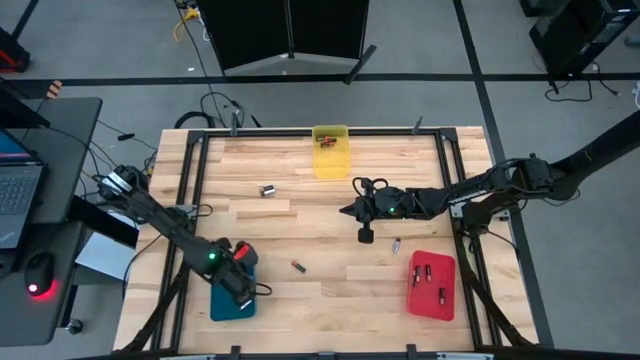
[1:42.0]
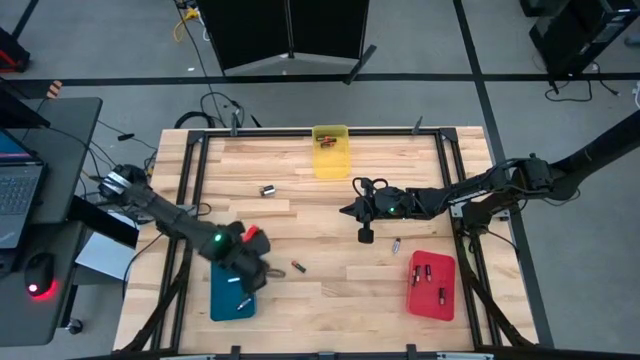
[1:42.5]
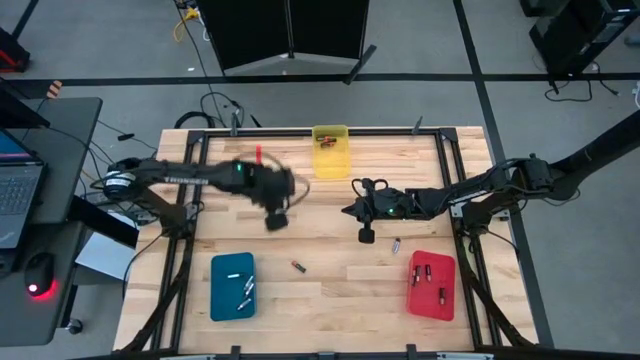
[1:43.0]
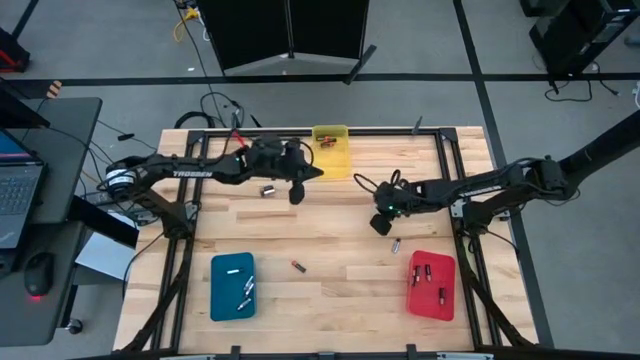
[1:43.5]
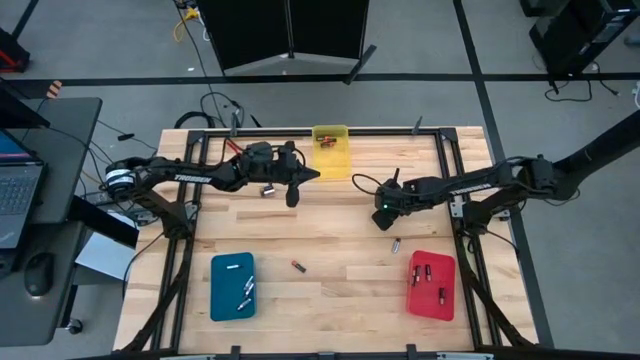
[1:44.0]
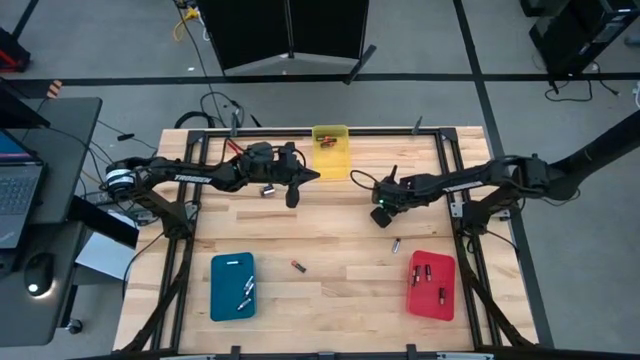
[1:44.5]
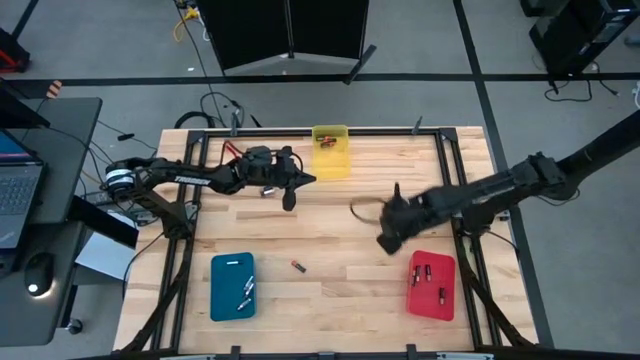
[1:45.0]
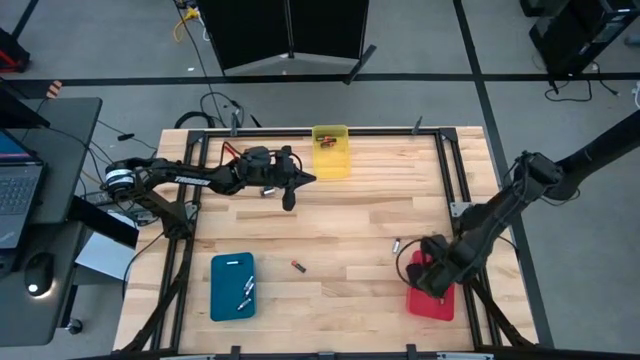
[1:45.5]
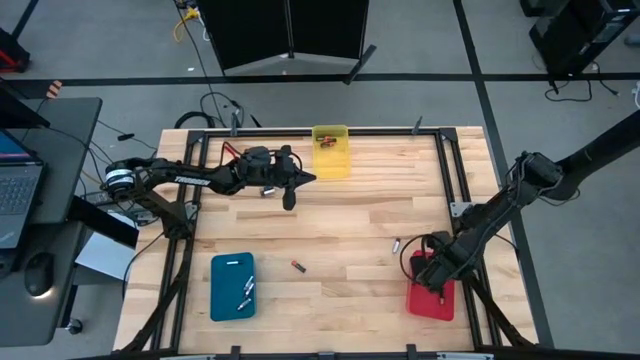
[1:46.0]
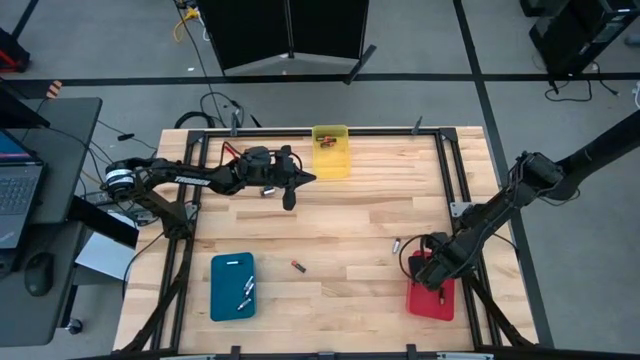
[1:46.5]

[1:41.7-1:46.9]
Task: Sort batteries
Put the right golden battery into the red bin

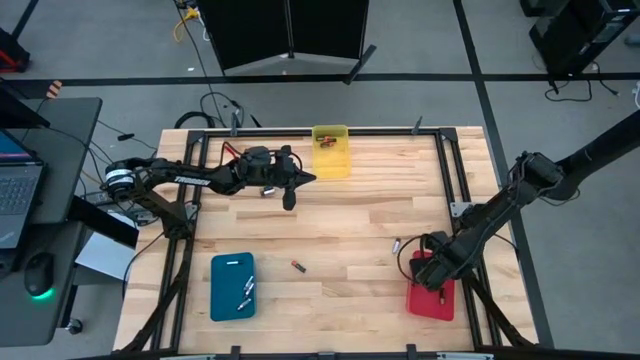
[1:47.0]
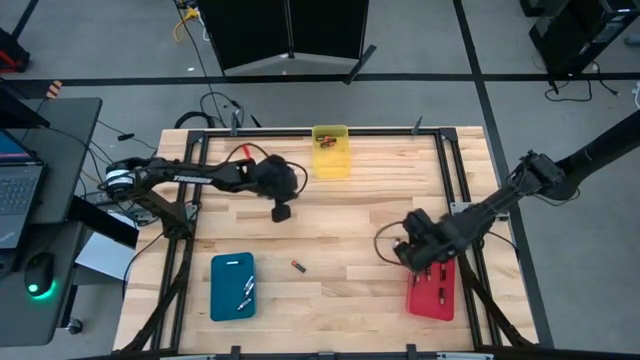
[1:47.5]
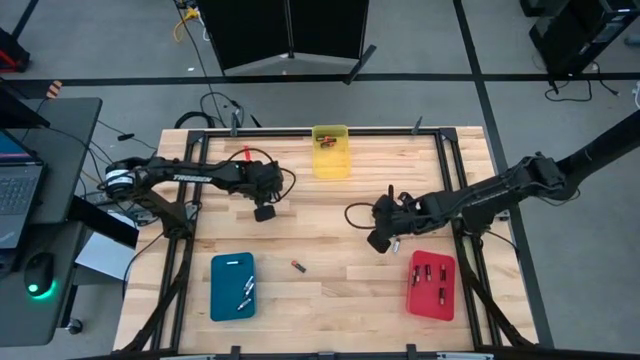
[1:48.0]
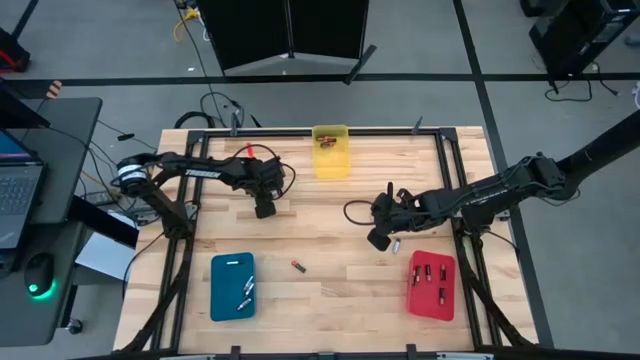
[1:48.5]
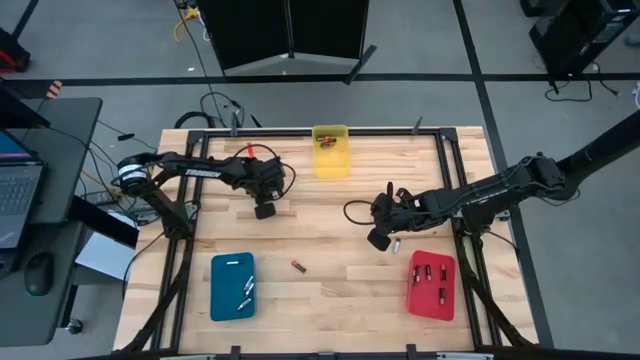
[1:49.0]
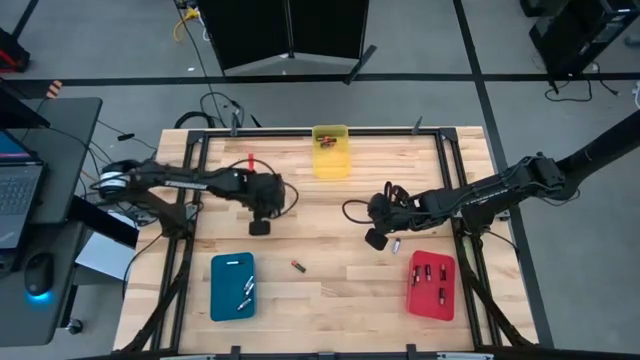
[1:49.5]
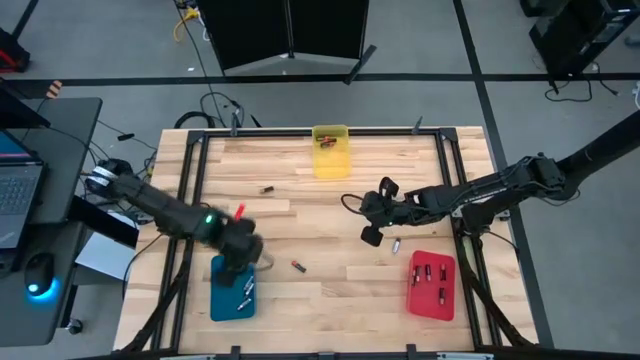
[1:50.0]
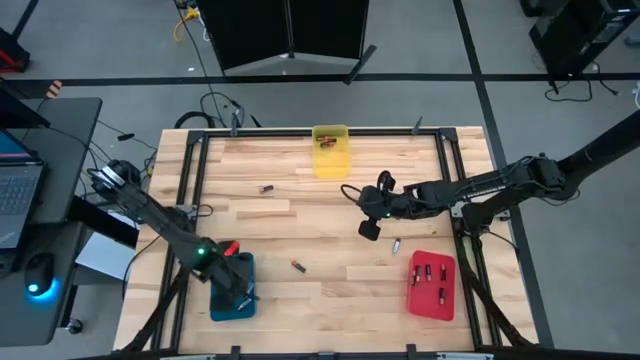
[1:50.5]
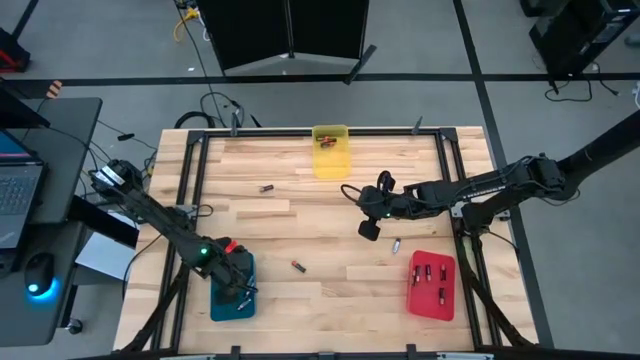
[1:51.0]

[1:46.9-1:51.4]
Put the top silver battery into the blue bin

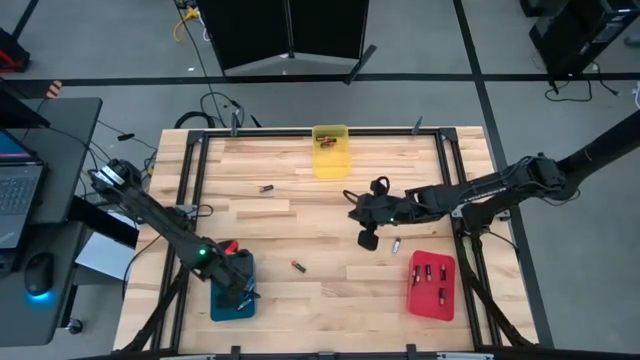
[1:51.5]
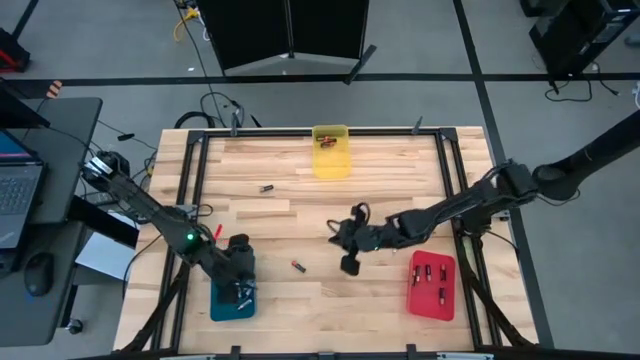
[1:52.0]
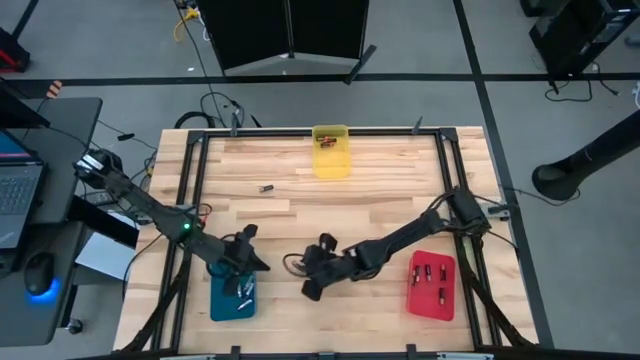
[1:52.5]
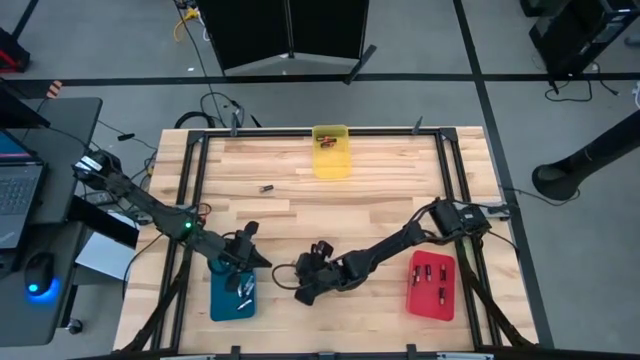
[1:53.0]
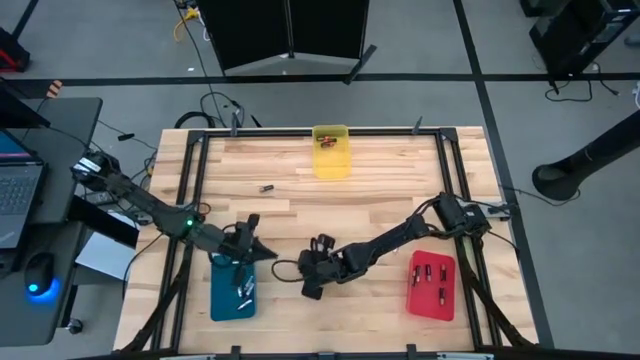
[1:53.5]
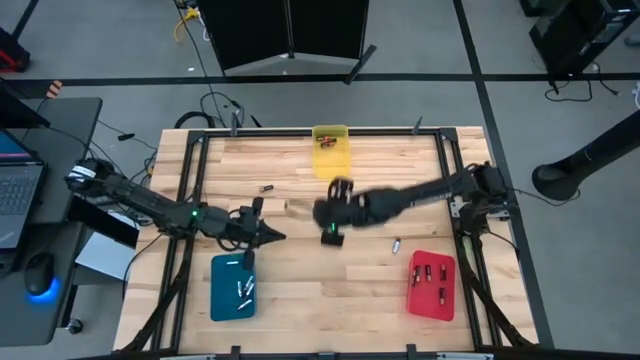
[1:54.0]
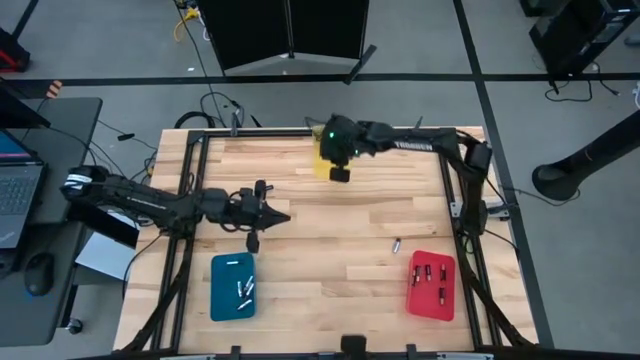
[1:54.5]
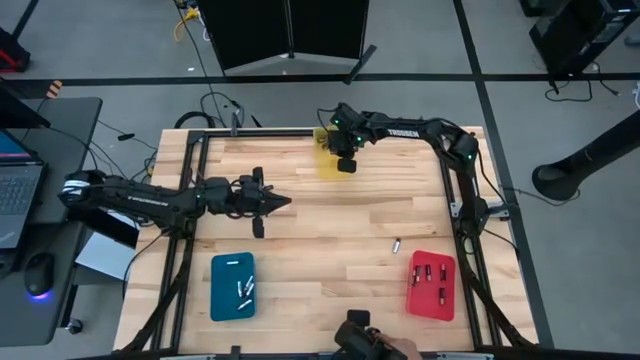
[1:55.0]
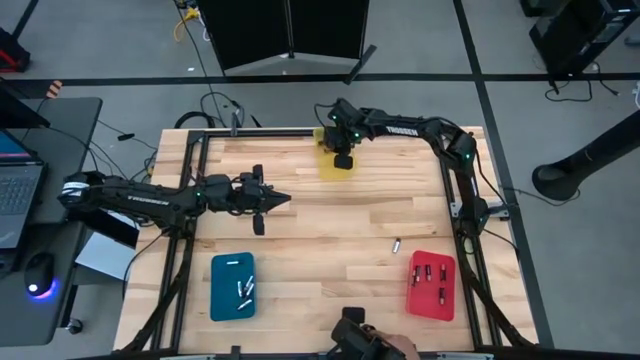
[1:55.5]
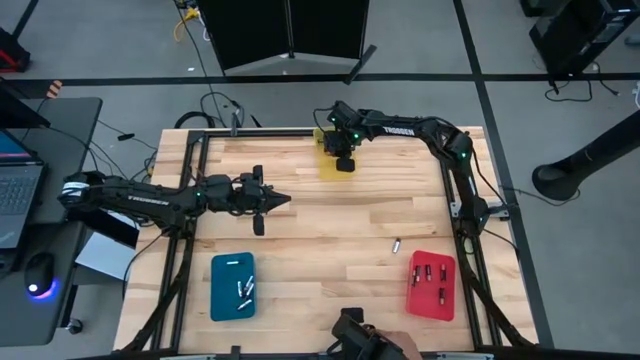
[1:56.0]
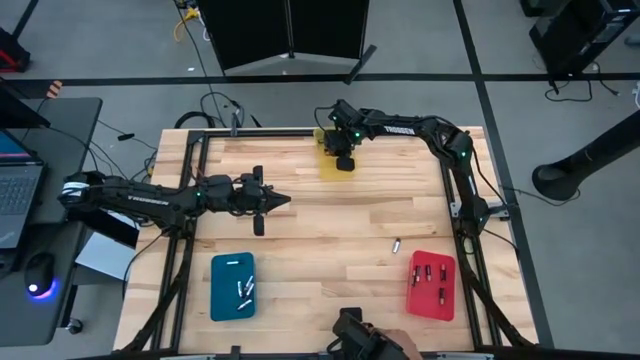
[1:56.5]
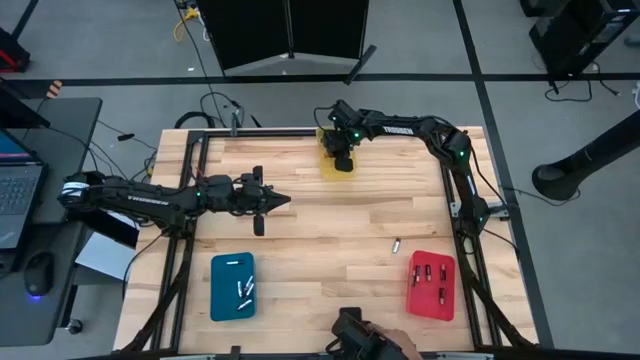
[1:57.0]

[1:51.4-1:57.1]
Put the orange battery into the yellow bin

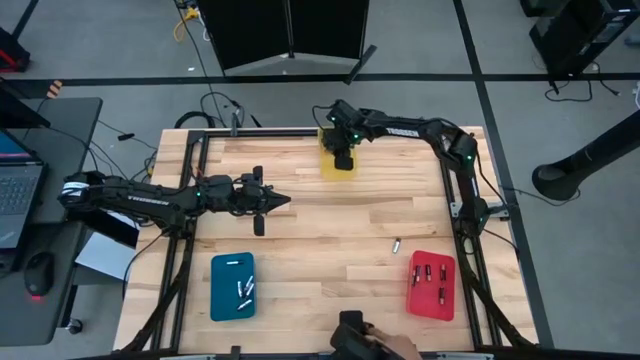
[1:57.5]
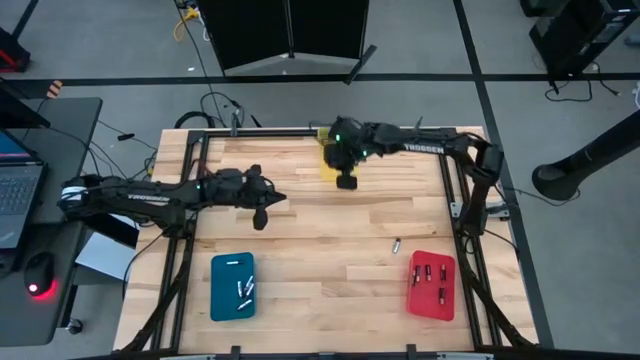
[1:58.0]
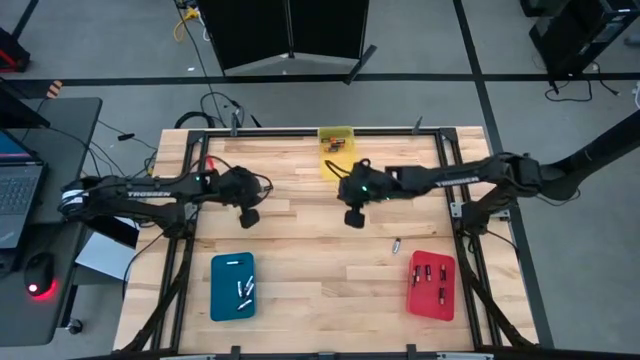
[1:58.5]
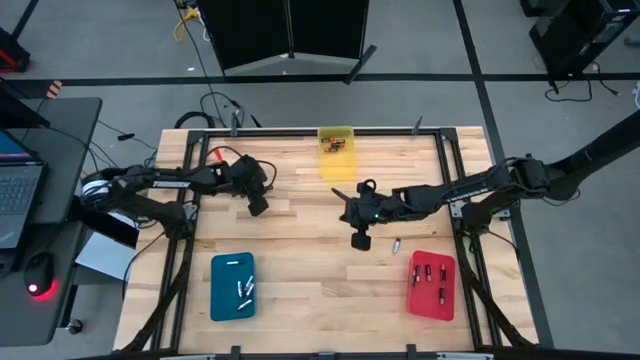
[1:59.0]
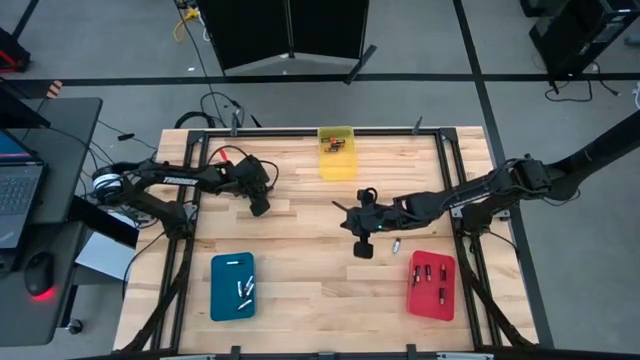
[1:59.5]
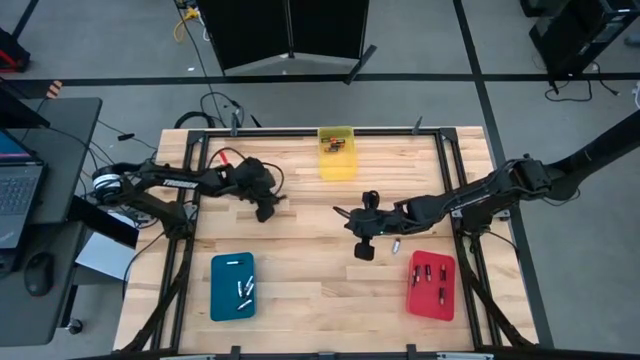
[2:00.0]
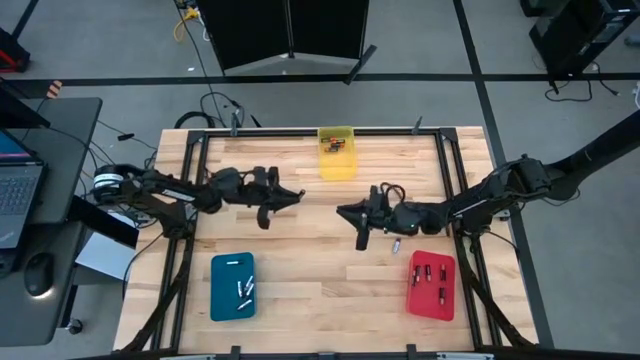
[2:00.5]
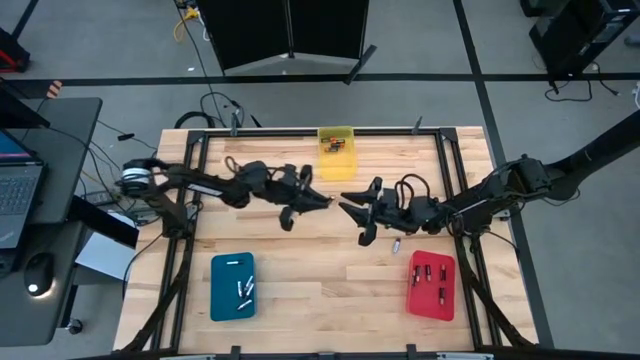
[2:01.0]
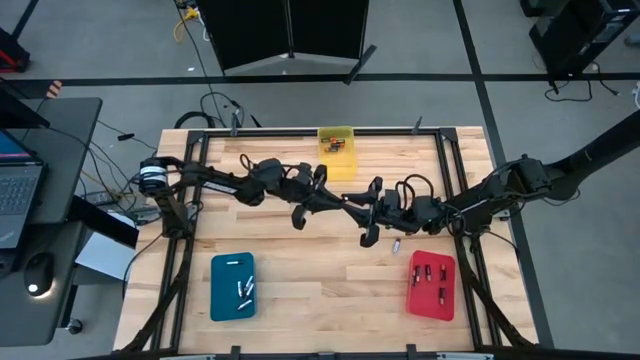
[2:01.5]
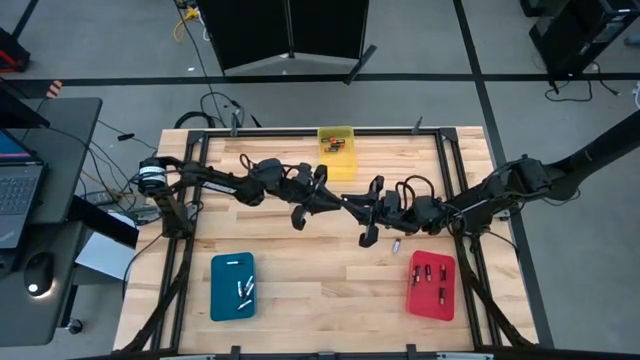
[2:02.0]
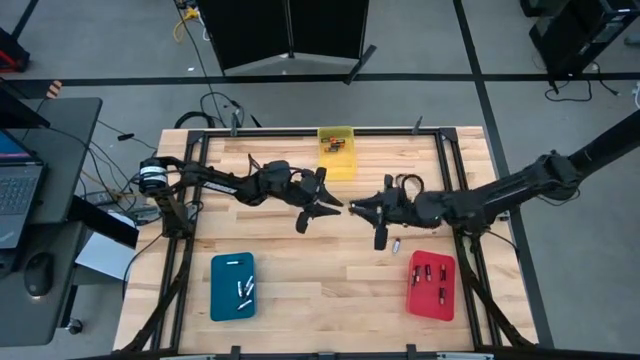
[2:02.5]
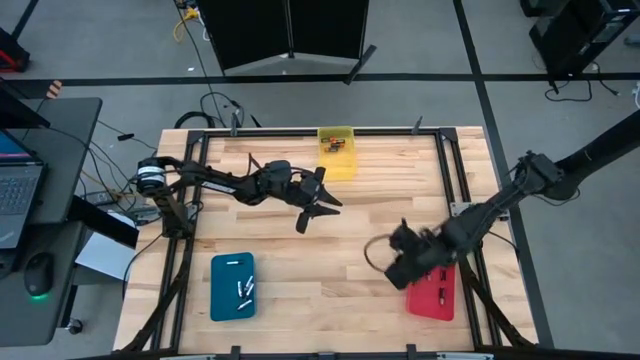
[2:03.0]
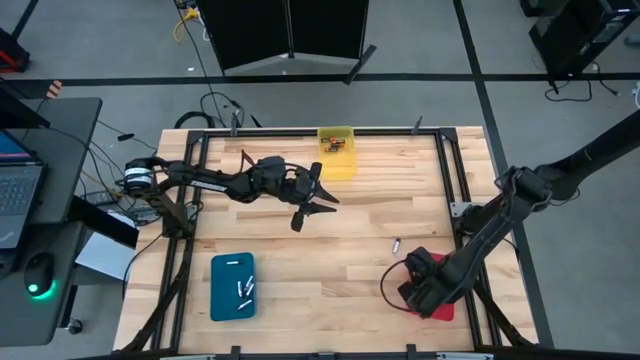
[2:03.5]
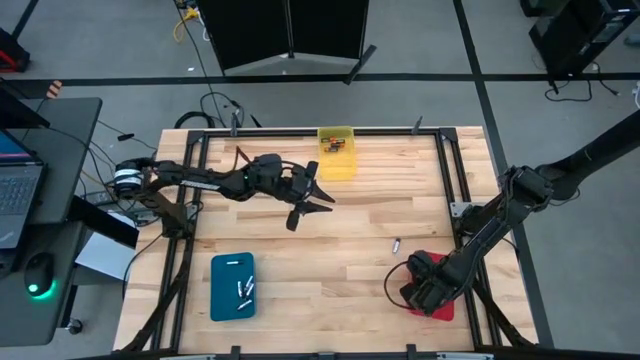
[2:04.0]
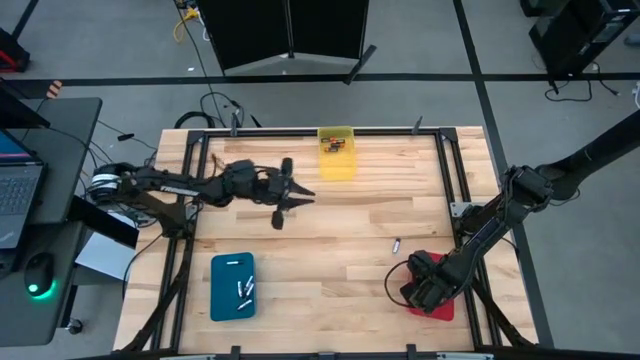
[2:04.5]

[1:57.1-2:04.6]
Put the golden battery into the red bin
